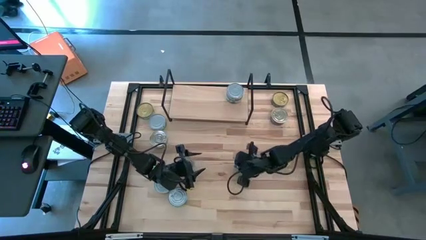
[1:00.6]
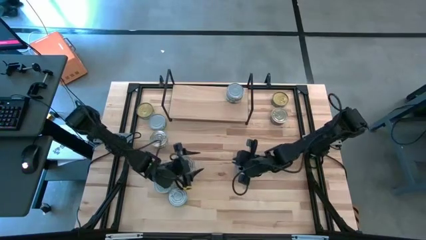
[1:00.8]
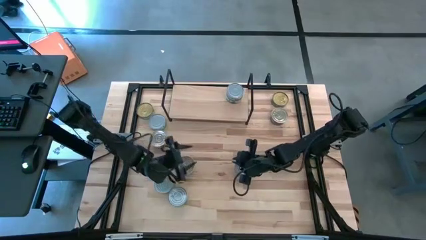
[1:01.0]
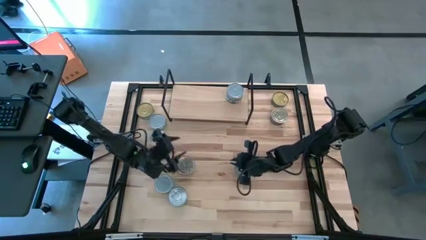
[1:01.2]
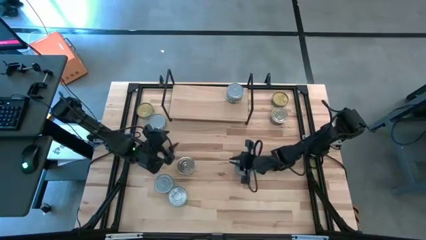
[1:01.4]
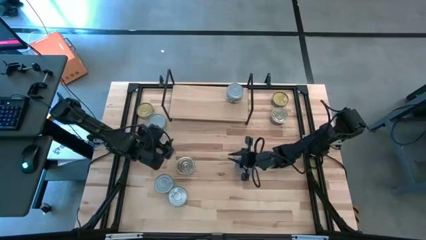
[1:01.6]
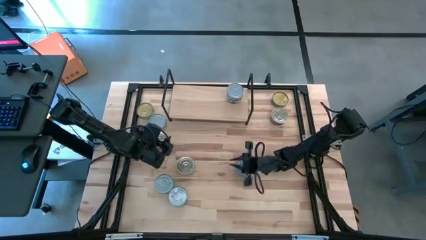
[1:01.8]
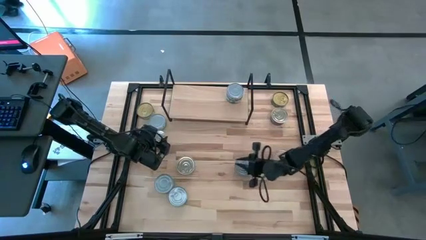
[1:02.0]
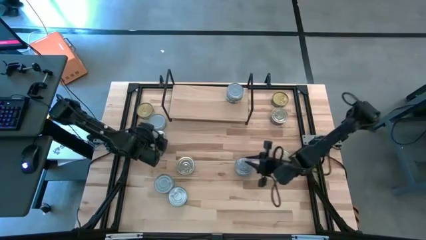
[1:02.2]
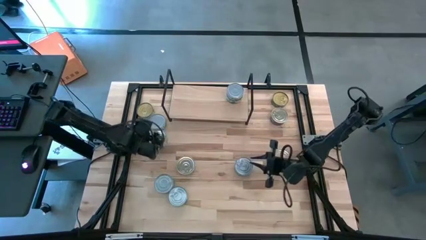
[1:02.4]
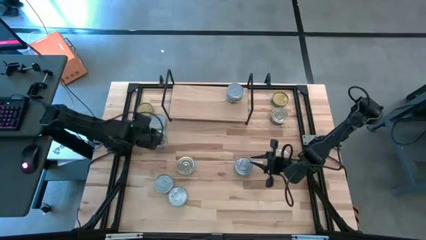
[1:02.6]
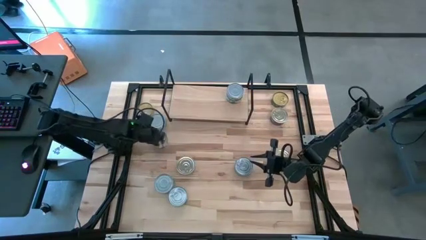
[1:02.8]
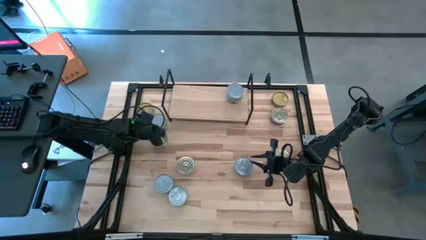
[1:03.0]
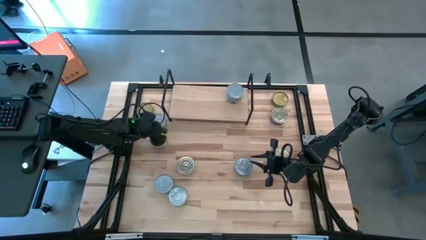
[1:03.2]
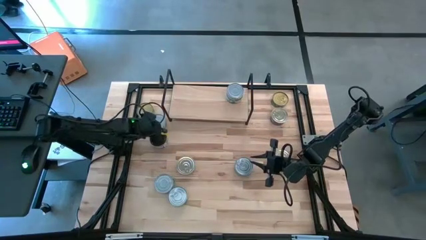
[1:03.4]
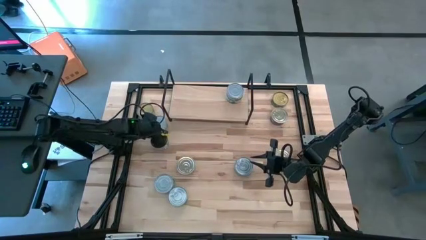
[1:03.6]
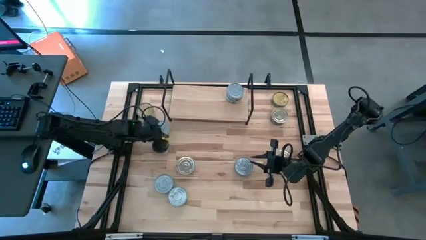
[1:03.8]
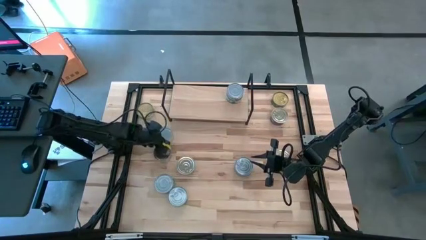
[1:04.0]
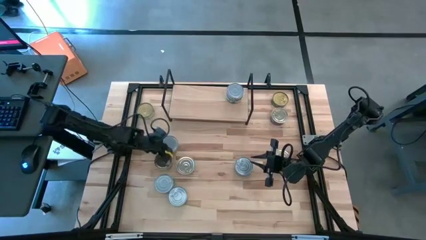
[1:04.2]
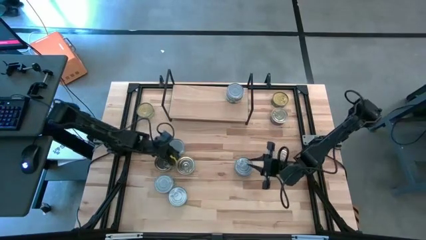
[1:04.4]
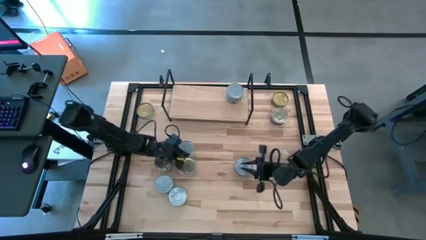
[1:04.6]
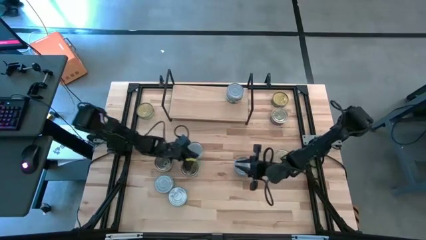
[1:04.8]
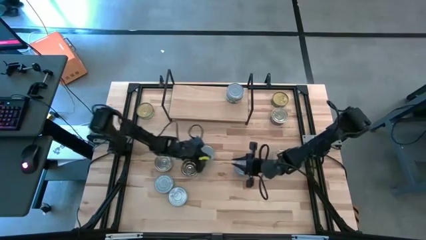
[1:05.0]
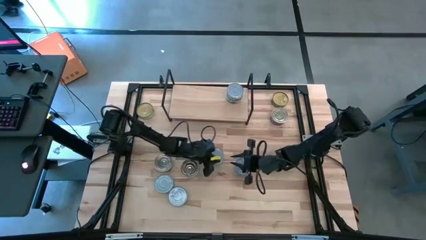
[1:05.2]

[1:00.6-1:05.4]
Task: Stack canned seafood by type on shelf
Move the green tuna can to the center of the table

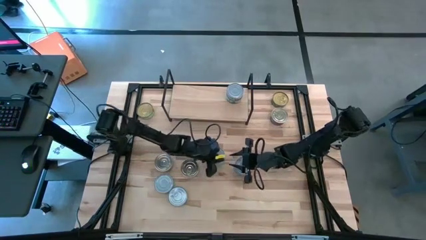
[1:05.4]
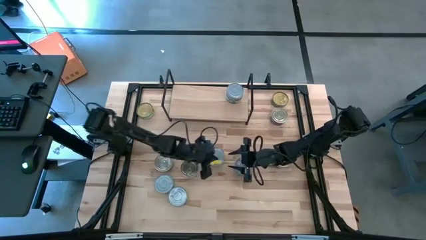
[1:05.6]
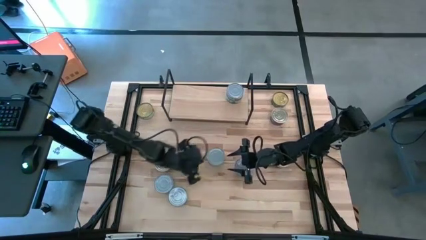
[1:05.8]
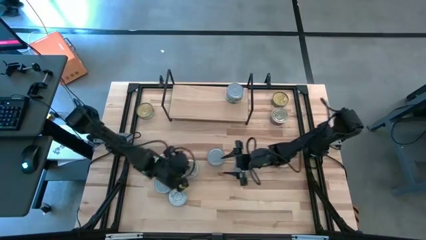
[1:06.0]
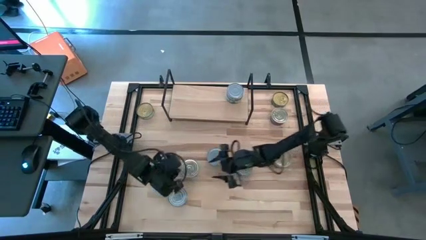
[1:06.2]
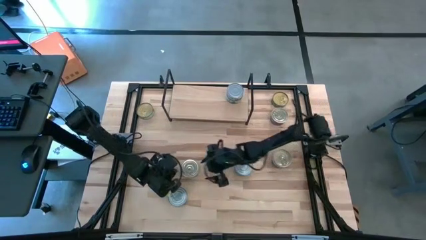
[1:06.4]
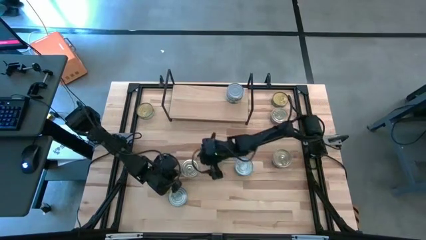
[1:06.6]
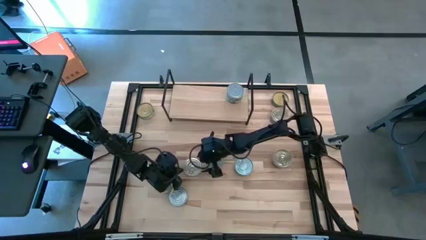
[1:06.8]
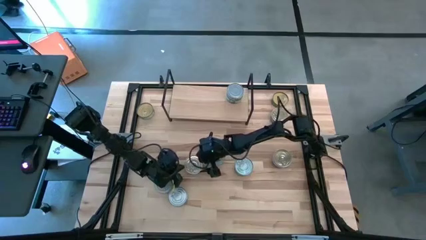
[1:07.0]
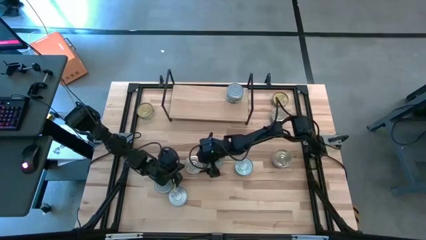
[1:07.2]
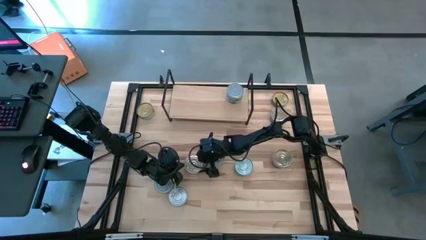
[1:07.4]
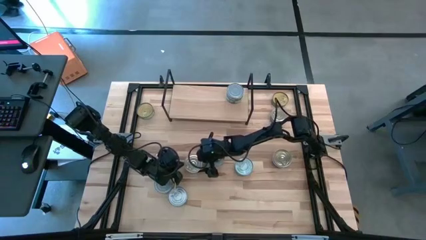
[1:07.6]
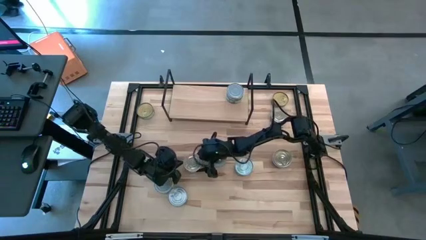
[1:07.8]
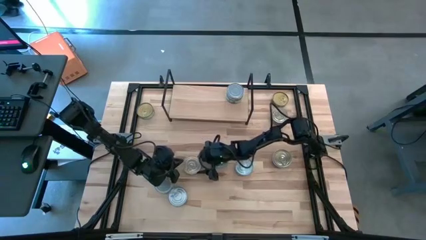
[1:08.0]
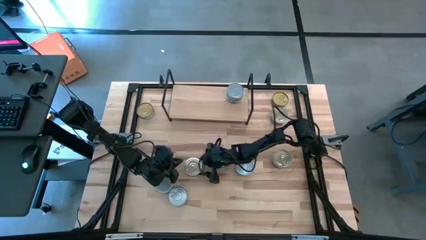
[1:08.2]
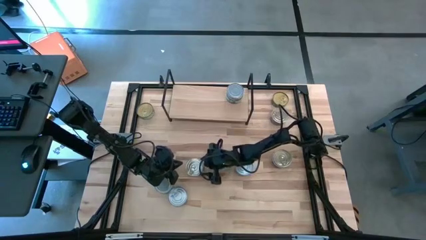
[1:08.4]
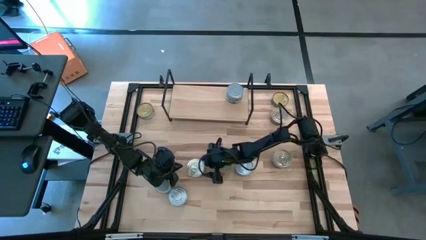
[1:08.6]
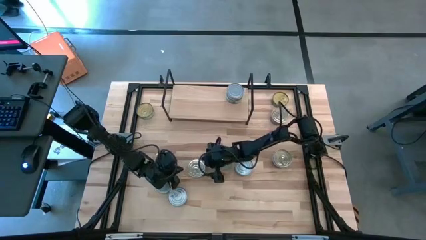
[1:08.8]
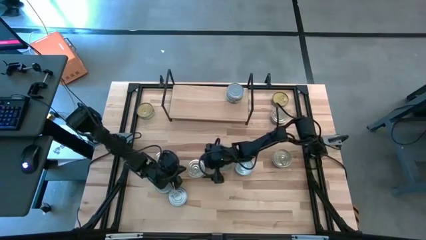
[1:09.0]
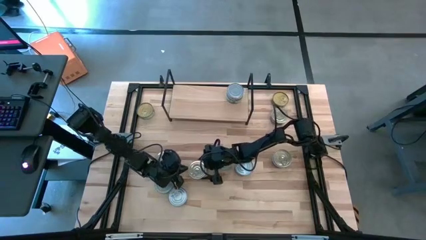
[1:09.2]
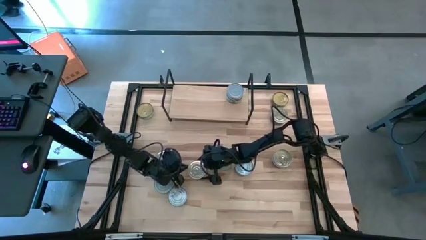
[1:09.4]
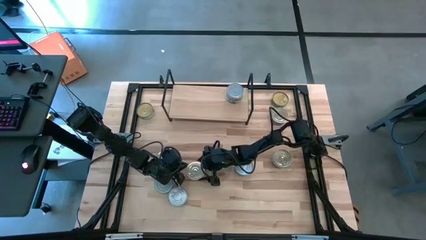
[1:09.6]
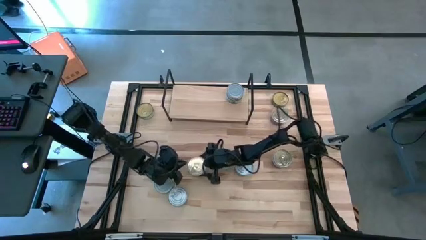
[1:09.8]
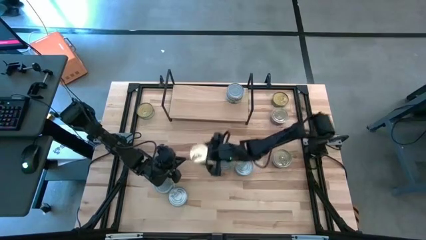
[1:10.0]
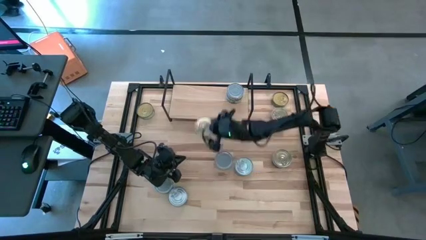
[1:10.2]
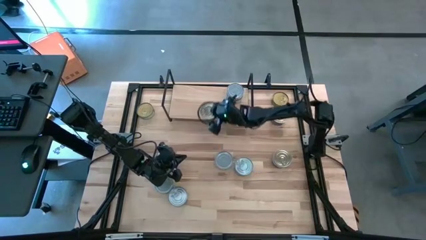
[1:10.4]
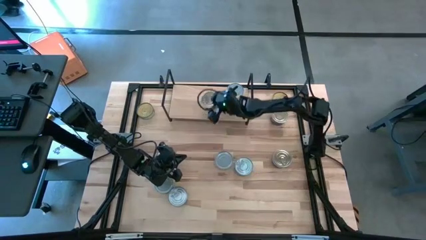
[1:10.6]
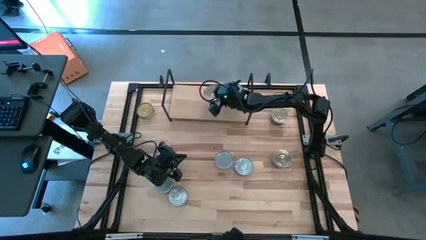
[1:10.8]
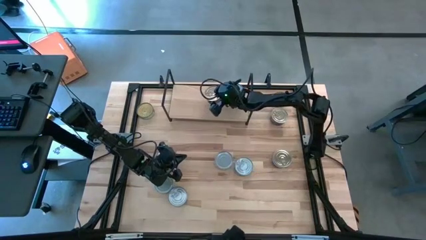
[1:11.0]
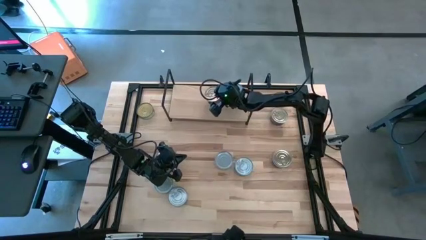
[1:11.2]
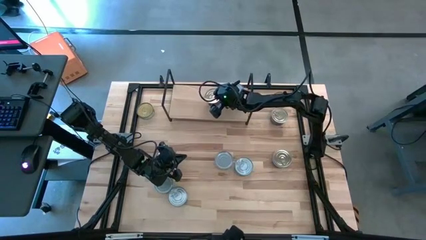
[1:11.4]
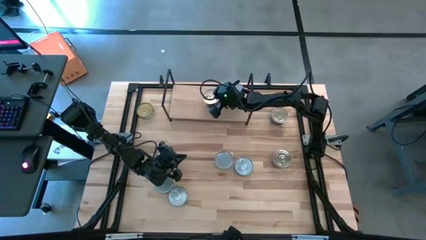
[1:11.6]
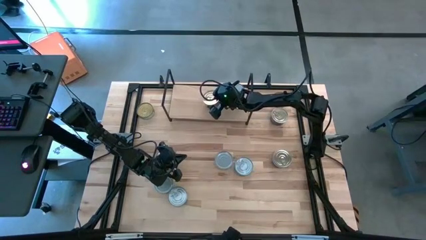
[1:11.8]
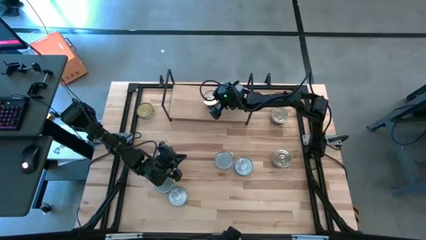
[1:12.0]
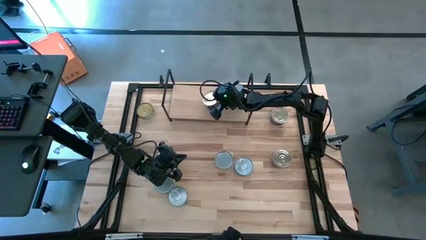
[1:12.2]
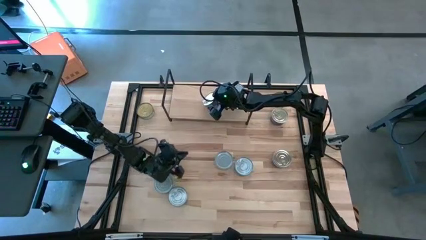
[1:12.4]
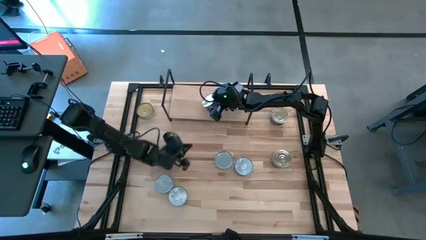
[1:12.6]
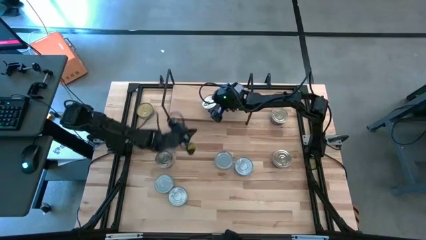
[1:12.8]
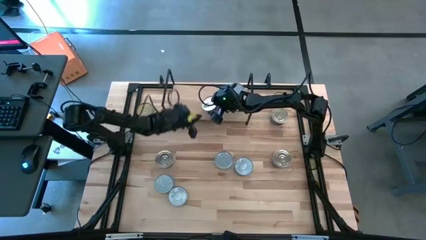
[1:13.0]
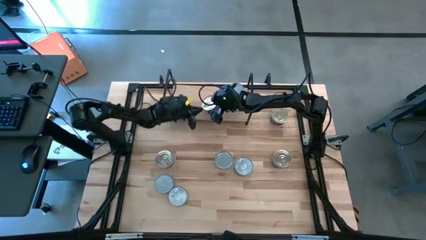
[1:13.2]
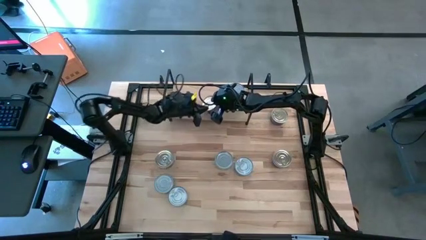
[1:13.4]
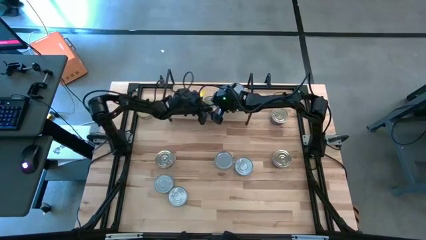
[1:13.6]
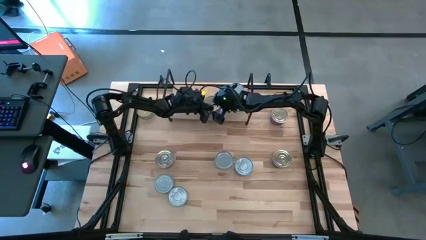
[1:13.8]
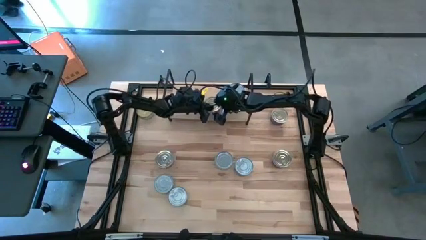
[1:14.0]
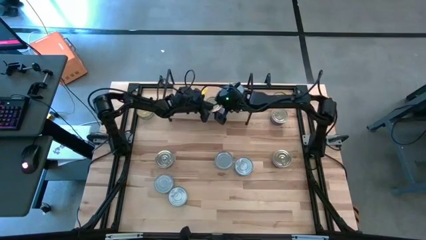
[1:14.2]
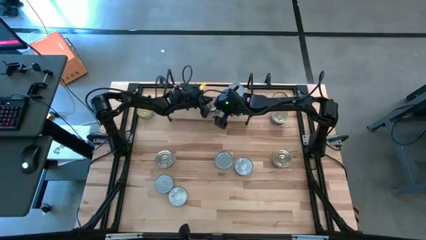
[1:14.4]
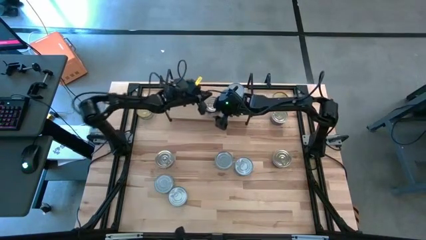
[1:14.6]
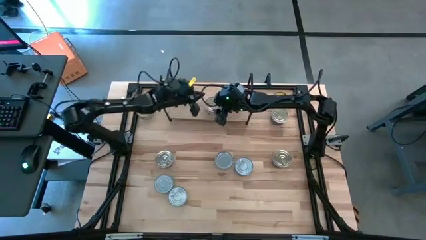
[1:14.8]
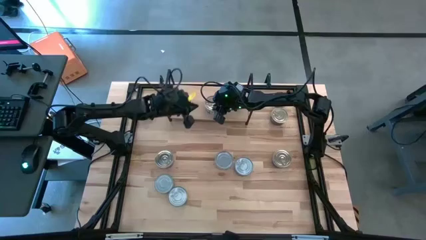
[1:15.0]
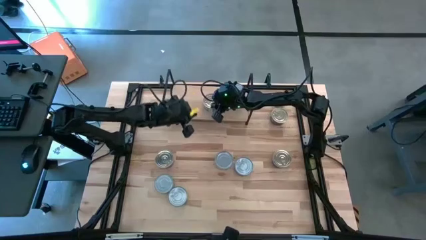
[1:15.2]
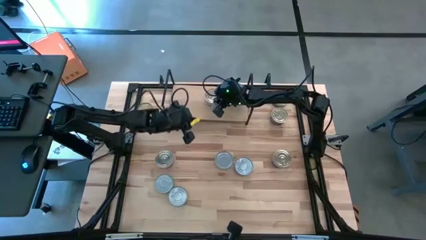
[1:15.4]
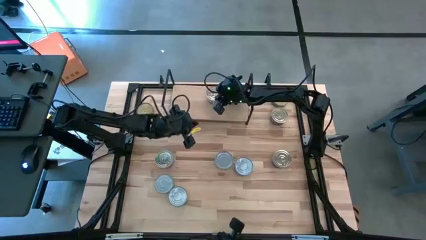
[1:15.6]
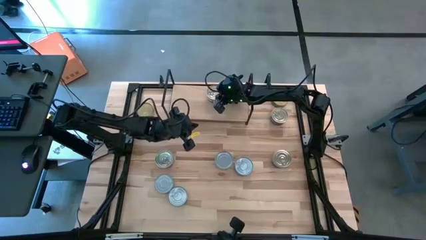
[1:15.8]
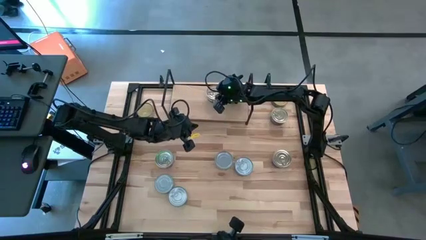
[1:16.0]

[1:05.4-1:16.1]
Put the blue-pink tuna can on the shelf
